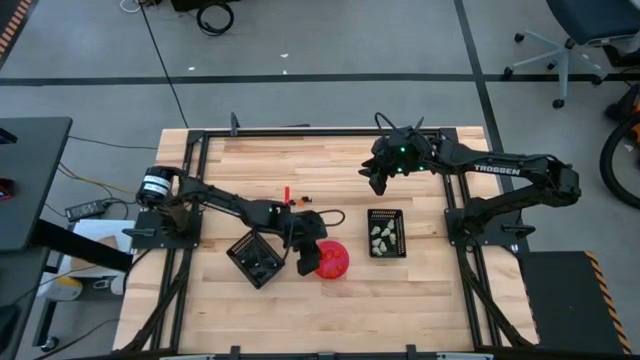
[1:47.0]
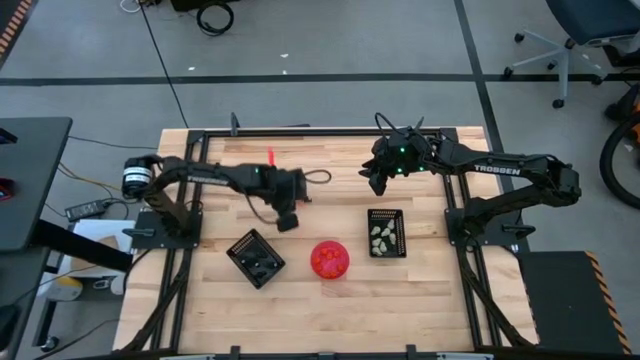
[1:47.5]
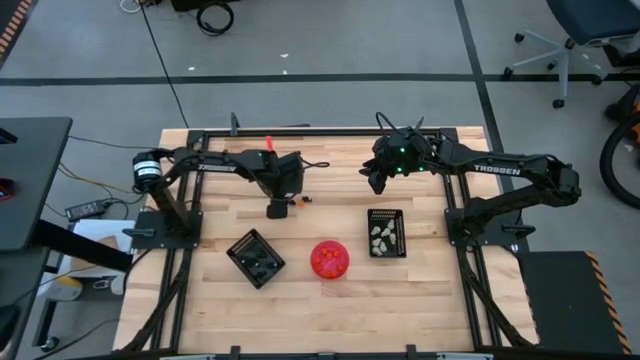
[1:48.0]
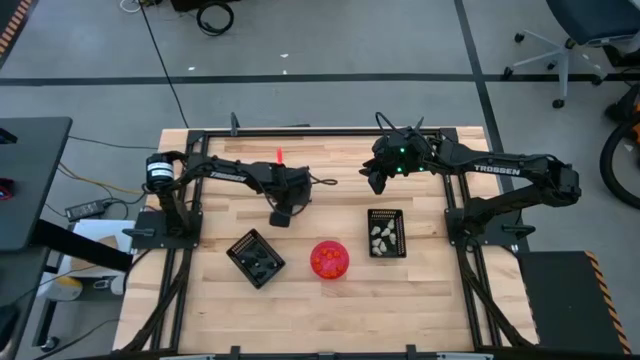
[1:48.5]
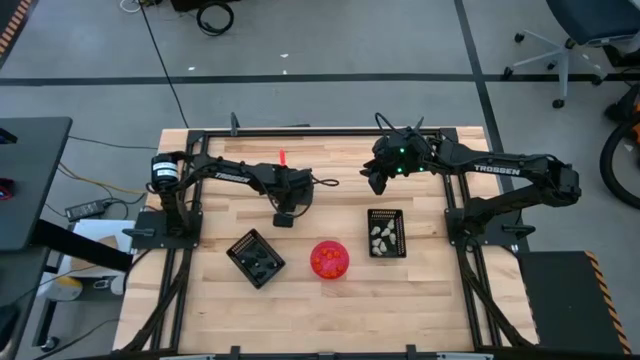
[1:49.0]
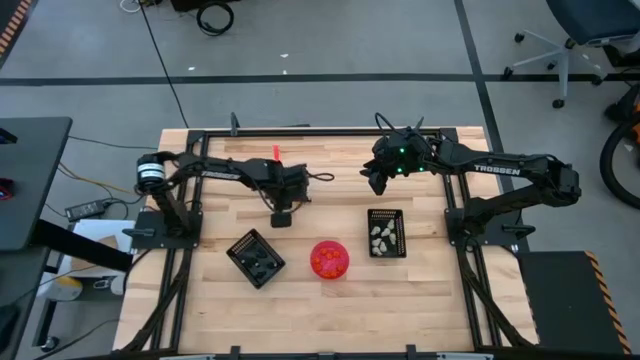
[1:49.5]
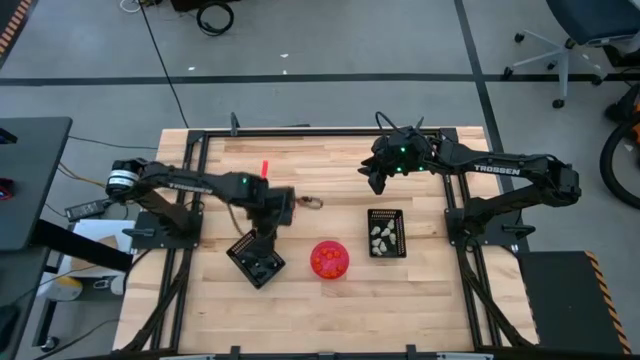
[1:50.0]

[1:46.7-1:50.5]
Task: Sort Halloween decoration
Put the black skeleton toy into the bottom black bin

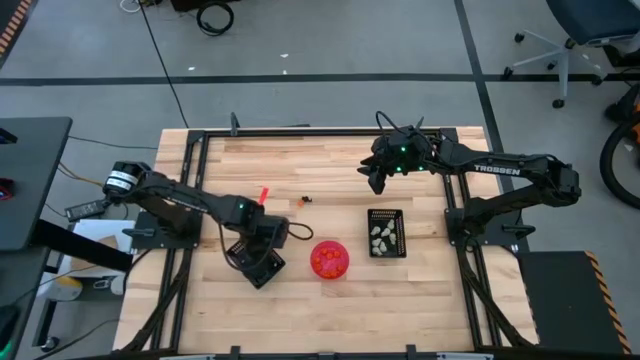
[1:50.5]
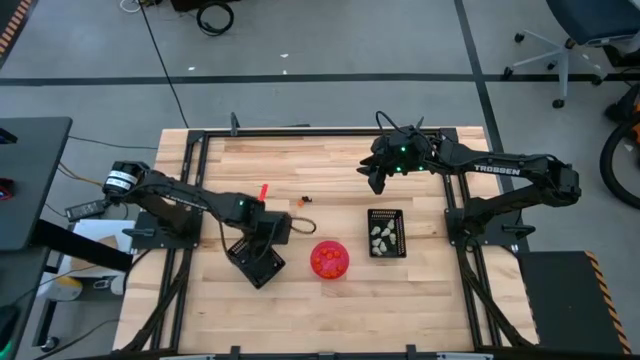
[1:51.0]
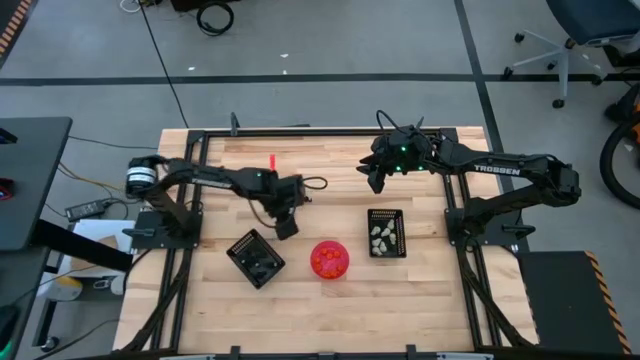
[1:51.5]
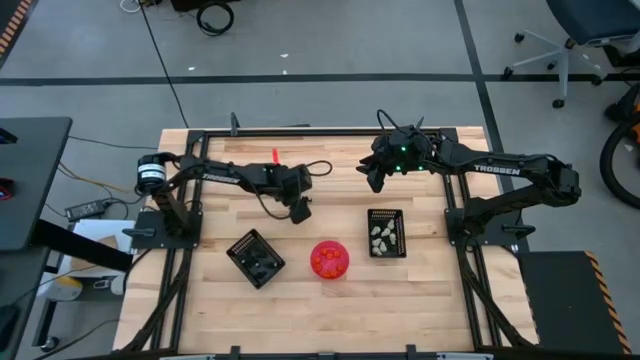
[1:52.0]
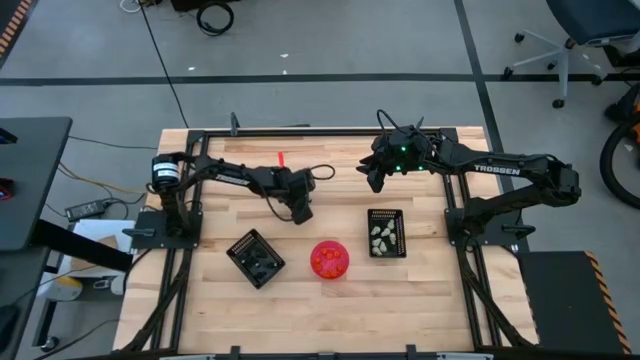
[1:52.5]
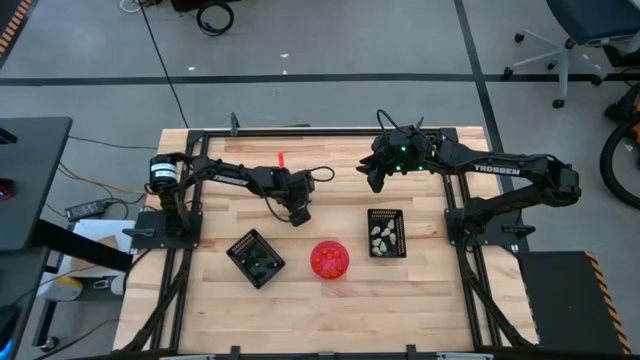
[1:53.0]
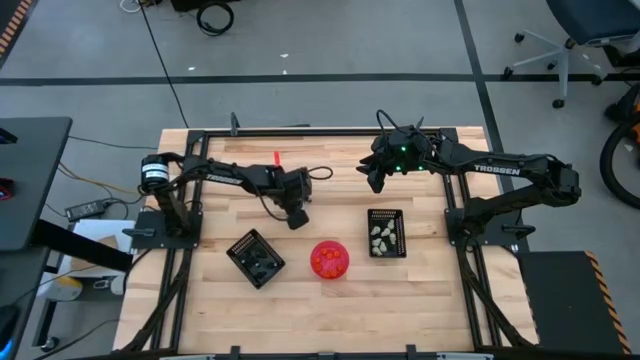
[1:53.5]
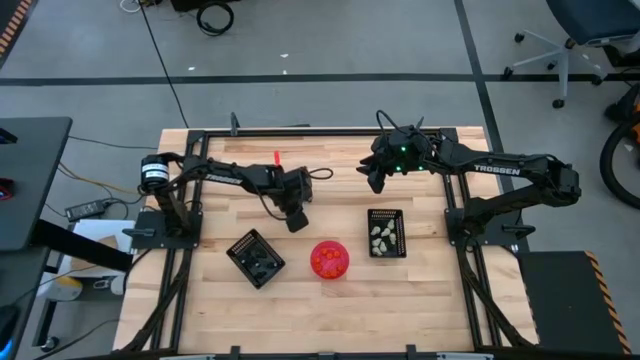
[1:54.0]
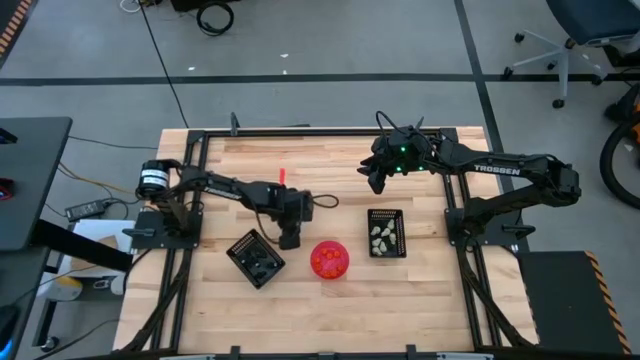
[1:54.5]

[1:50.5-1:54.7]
Put the orange pumpkin toy into the pink bowl

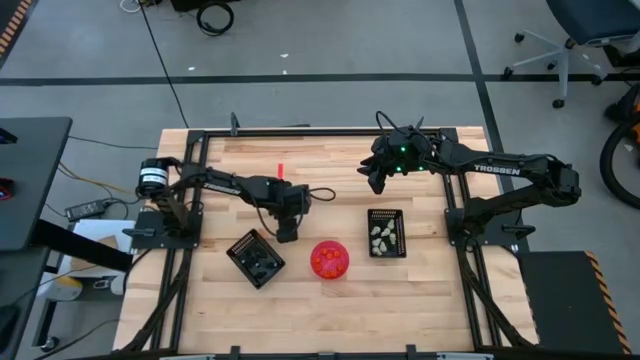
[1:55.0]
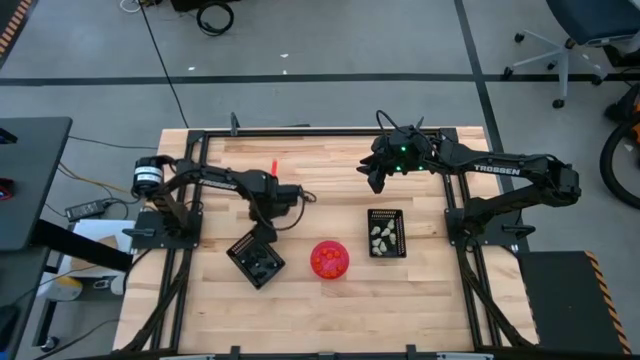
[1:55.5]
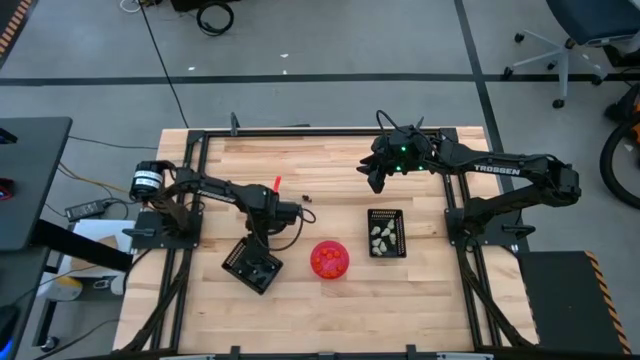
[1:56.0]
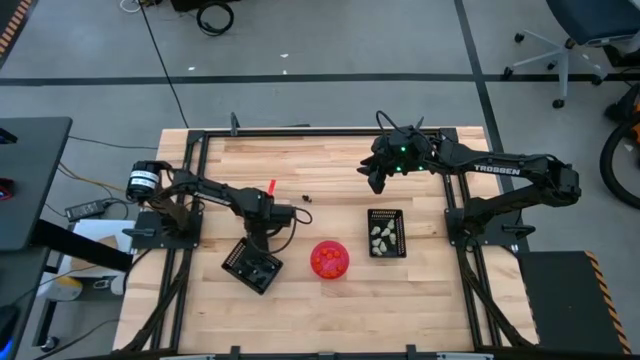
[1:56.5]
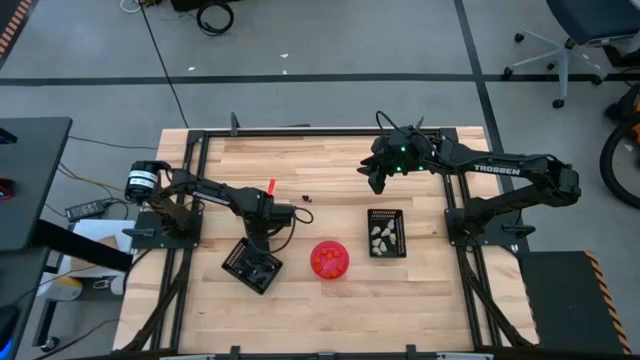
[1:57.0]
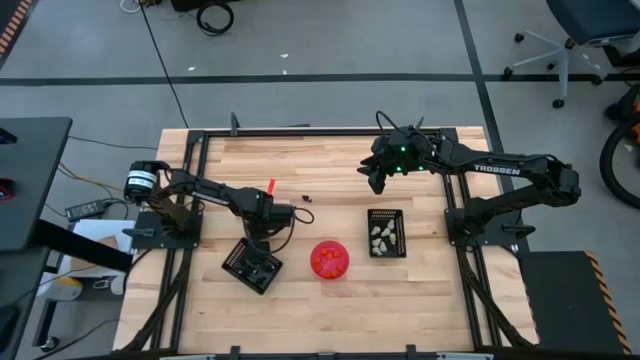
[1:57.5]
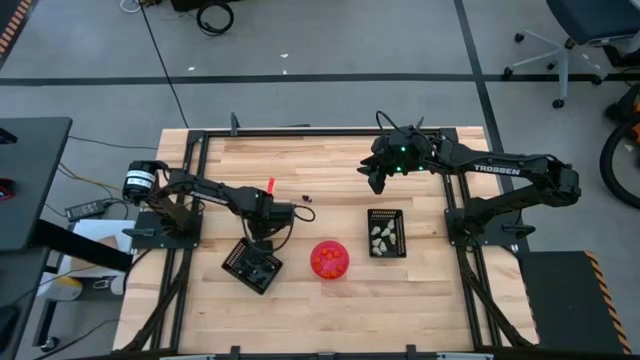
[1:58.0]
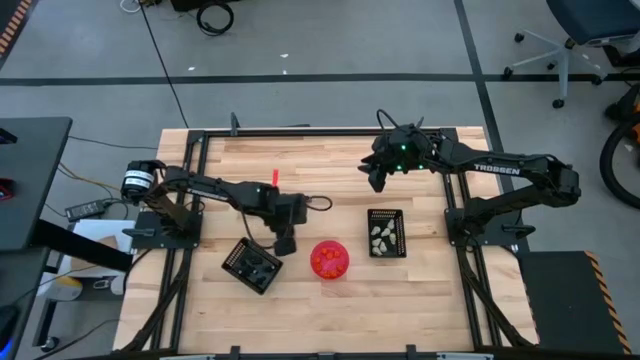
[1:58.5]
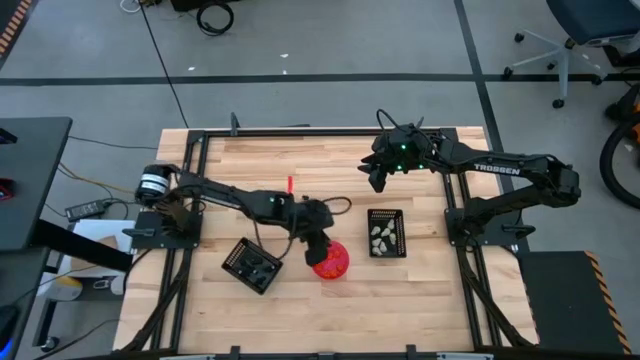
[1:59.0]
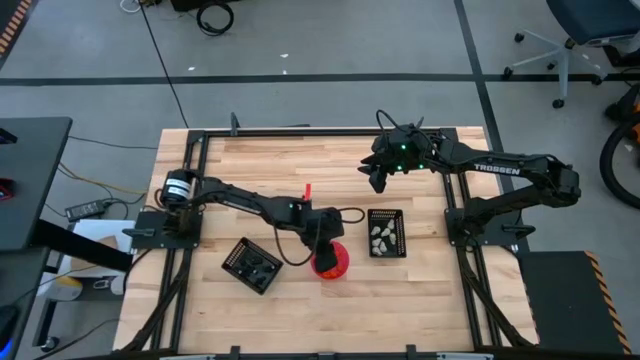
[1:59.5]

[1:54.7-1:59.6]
Put the orange pumpkin toy into the pink bowl

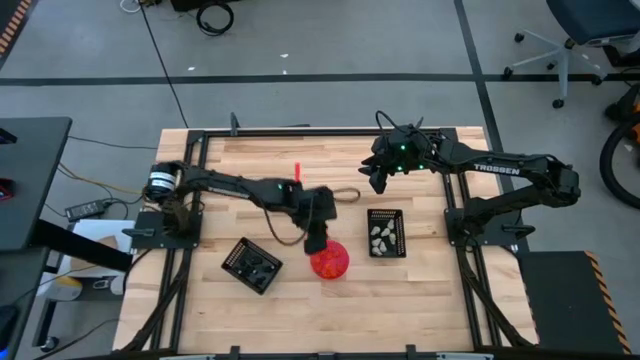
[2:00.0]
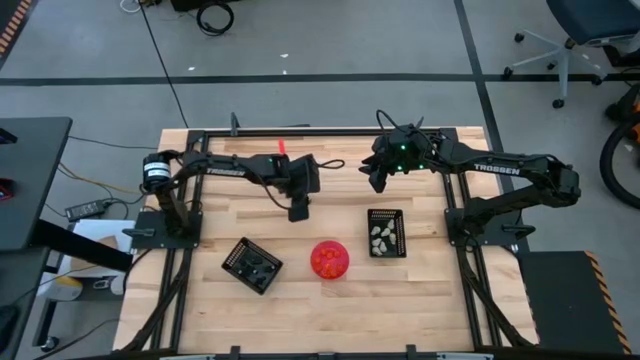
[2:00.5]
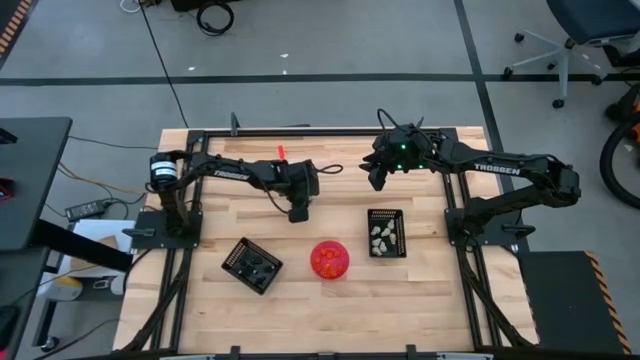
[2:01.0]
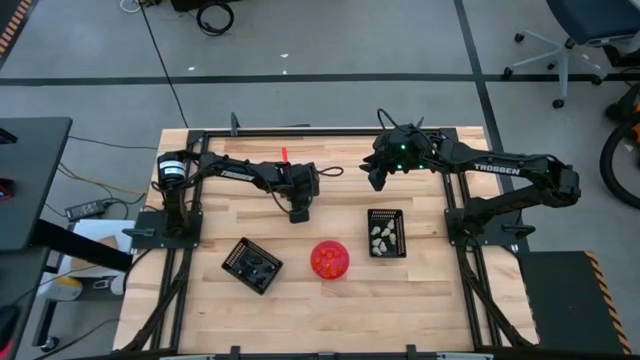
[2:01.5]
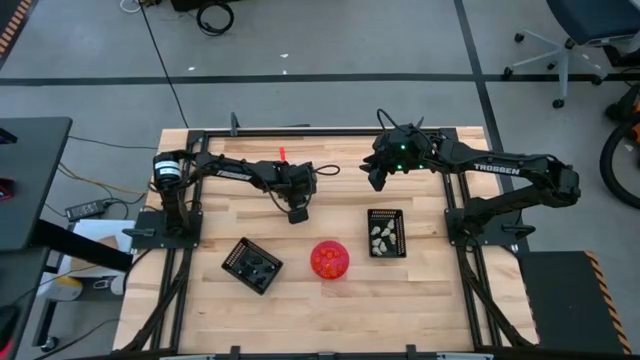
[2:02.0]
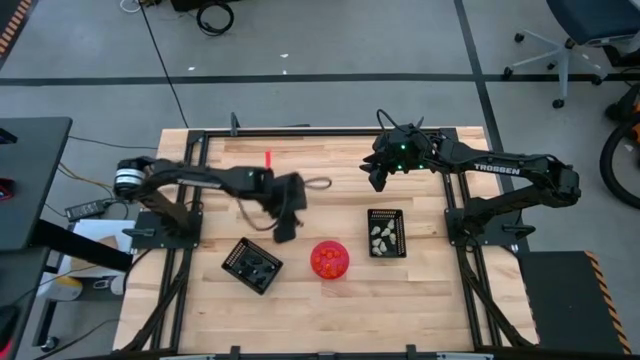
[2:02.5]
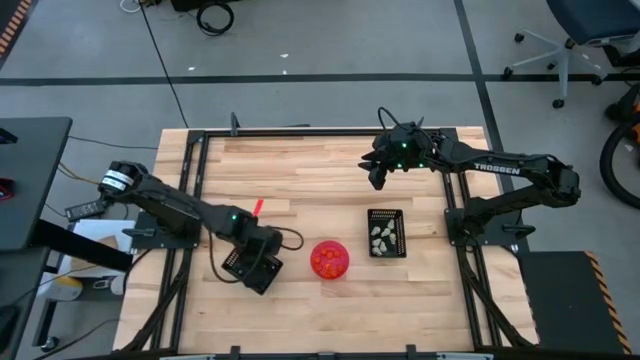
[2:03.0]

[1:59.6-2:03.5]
Put the black skeleton toy into the bottom black bin

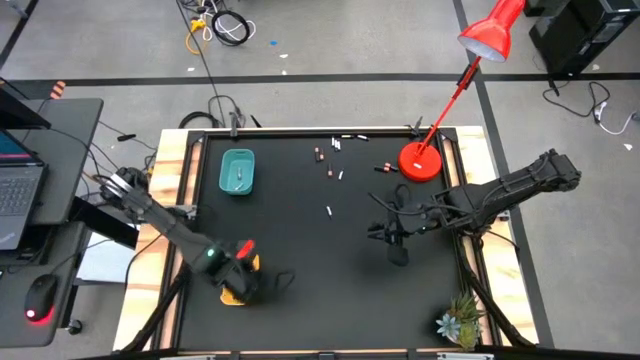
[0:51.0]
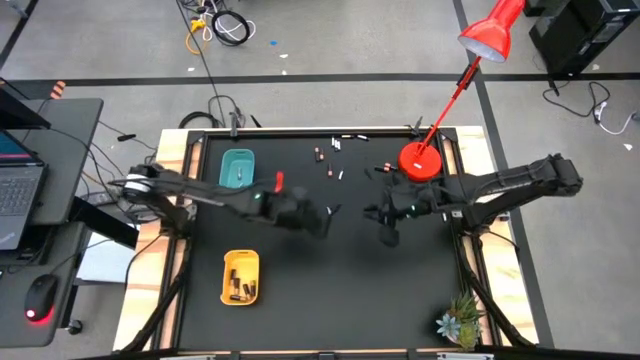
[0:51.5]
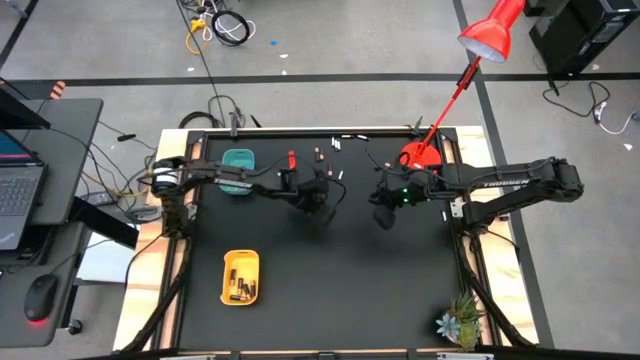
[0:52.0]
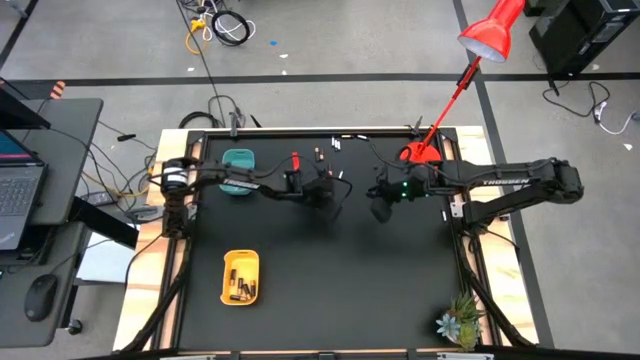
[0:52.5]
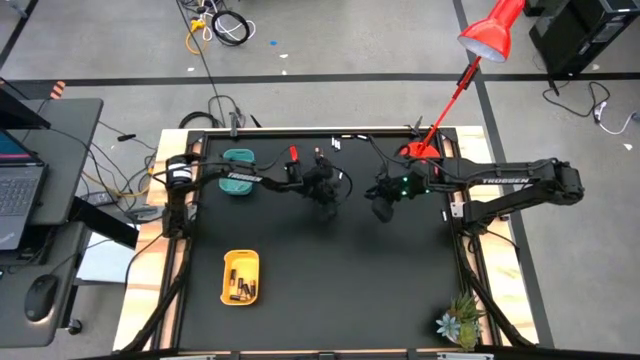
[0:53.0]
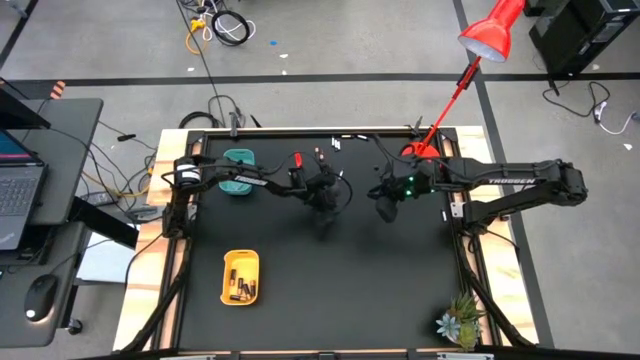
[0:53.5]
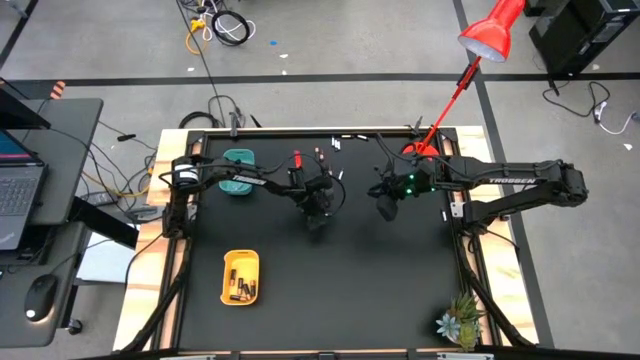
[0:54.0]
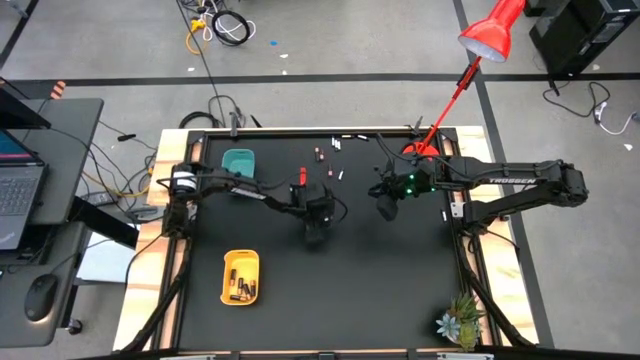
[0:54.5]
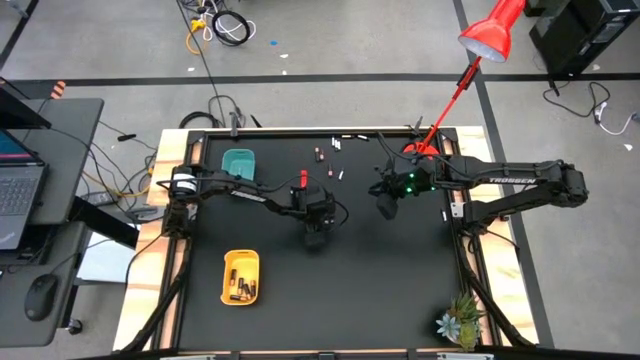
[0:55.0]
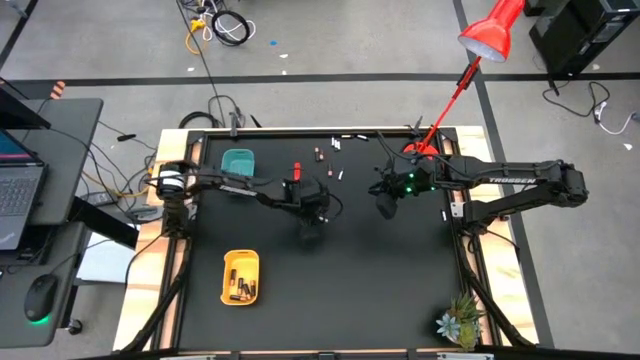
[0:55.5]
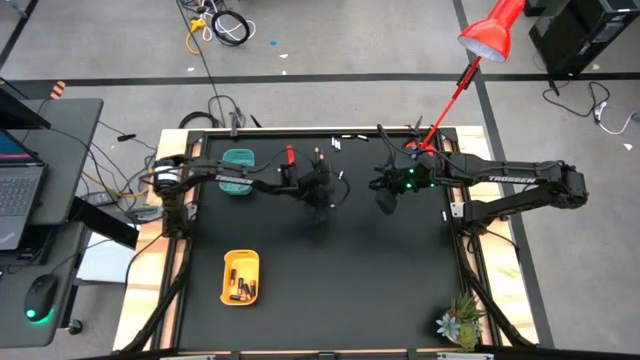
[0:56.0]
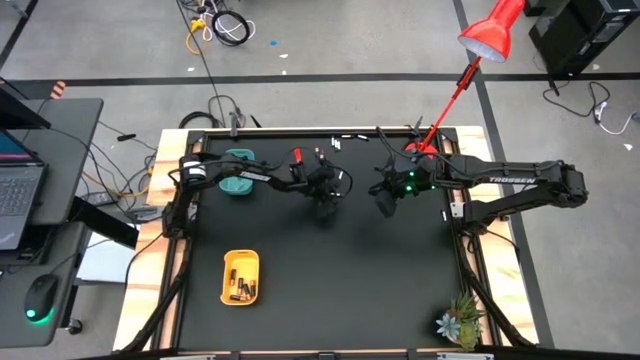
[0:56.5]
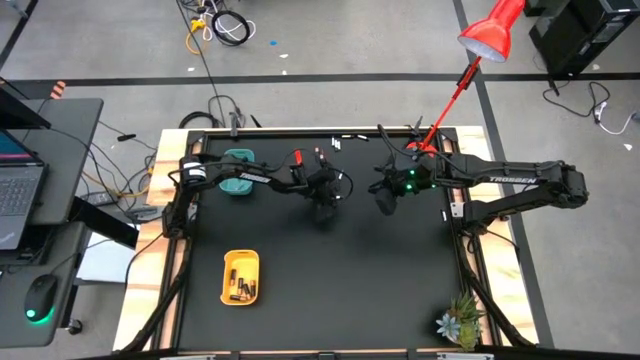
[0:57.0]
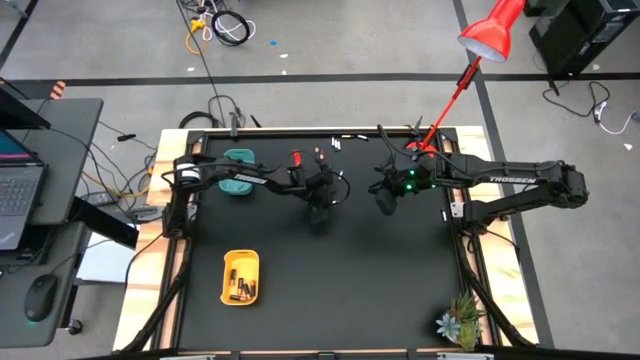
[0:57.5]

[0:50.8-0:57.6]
Task: Sort batteries
Put the white battery into the blue bin
